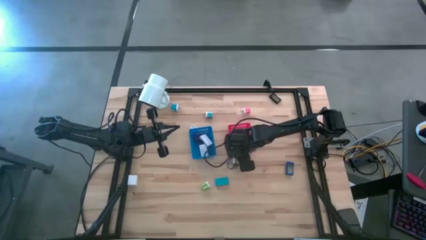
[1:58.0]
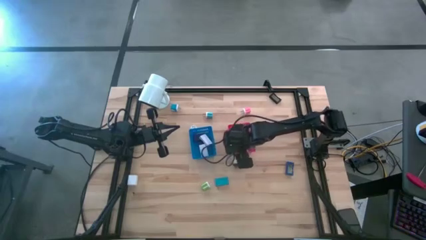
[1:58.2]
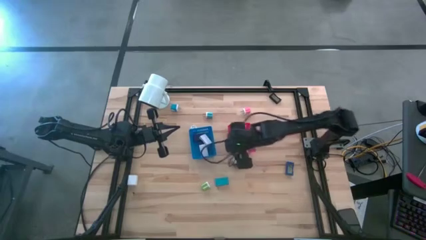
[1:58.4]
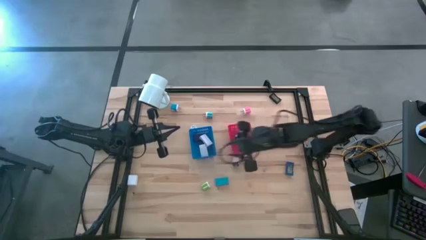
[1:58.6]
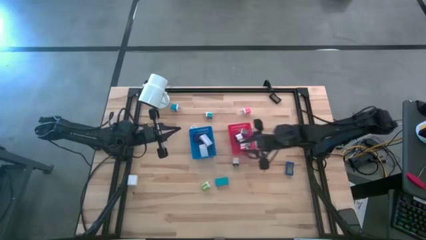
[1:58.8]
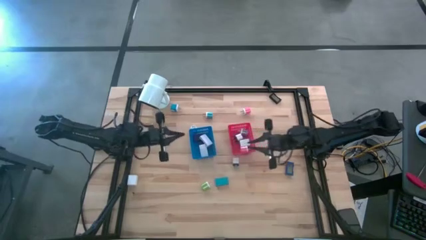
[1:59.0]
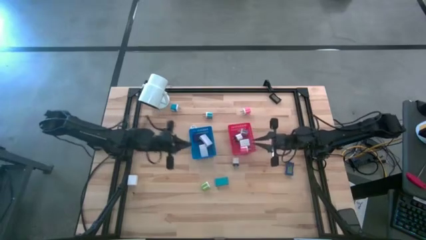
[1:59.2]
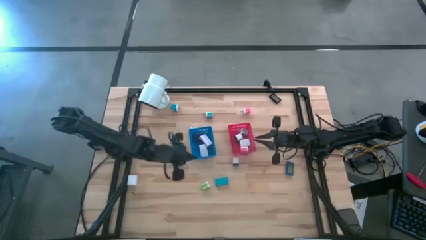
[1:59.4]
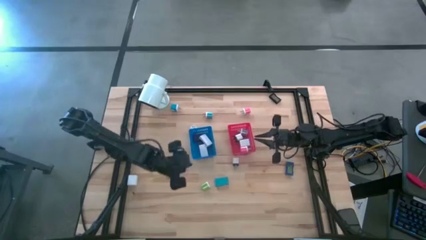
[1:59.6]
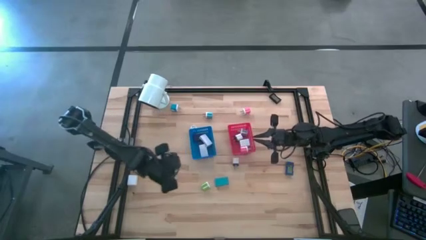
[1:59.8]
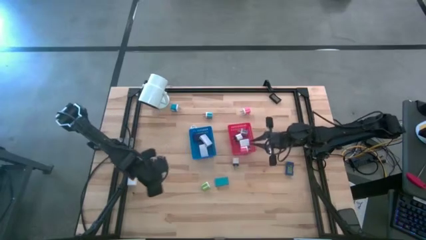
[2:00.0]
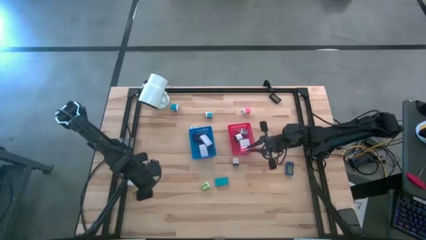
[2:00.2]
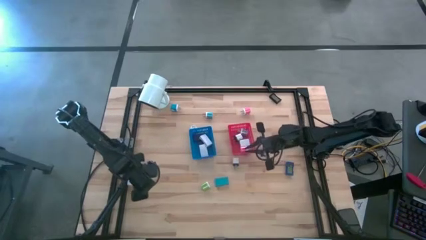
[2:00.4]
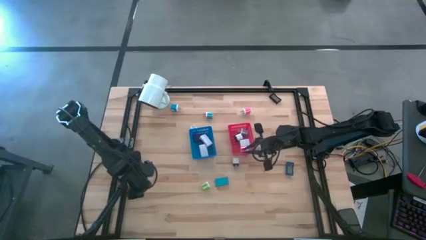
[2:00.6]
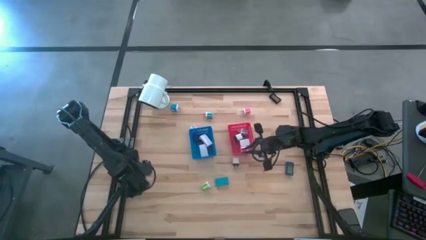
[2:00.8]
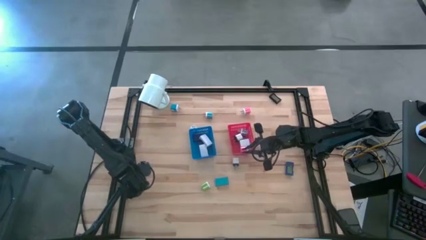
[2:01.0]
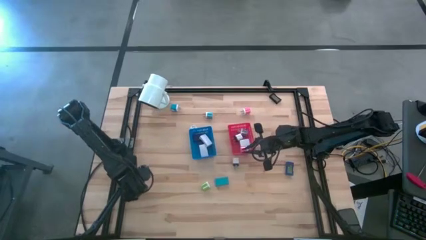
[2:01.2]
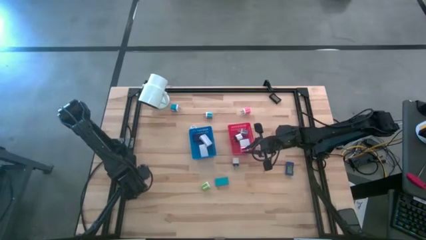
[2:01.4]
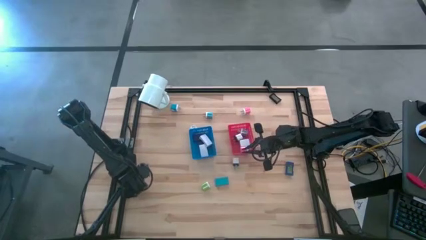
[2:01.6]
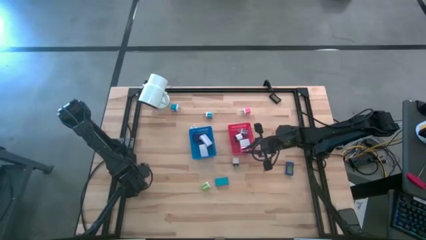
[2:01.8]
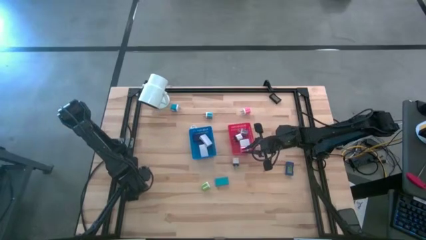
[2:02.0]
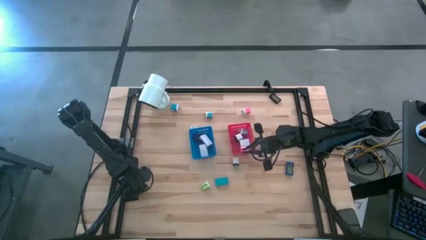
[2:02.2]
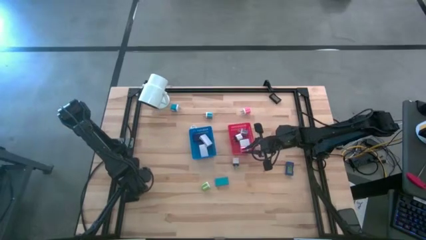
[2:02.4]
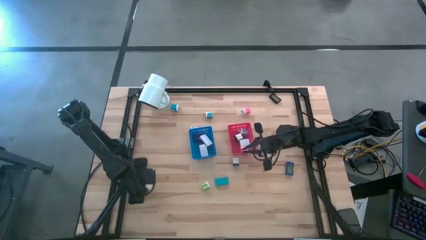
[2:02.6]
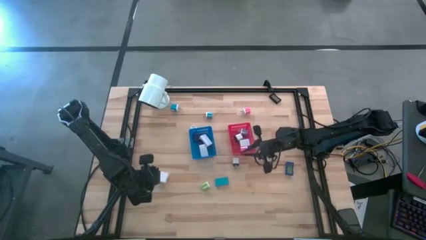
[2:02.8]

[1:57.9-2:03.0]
Task: Pick & Place Office items
Put the white charger adapter into the red bin

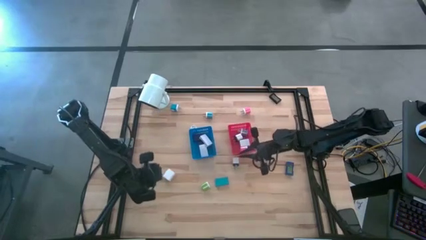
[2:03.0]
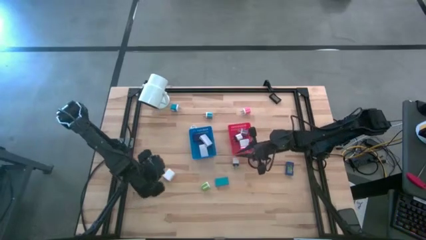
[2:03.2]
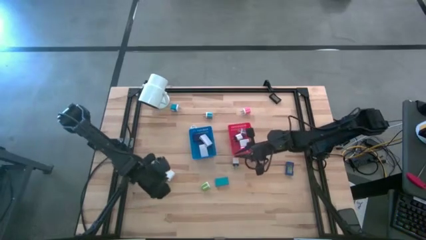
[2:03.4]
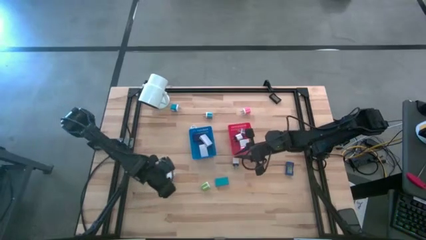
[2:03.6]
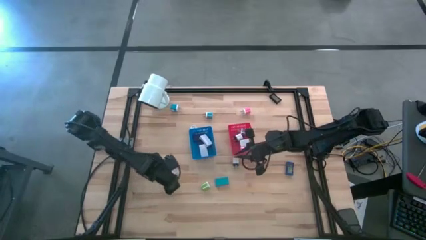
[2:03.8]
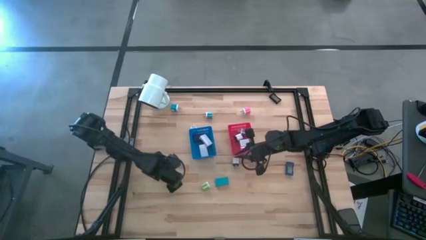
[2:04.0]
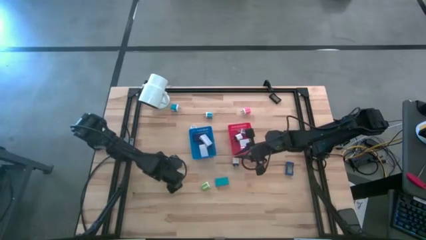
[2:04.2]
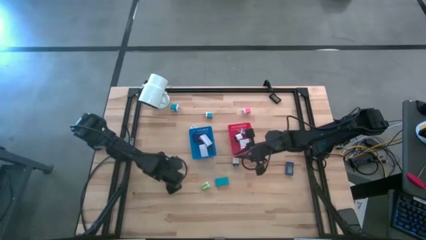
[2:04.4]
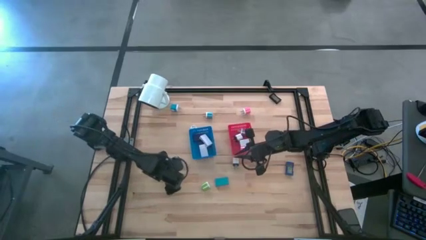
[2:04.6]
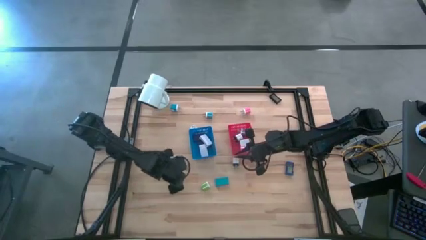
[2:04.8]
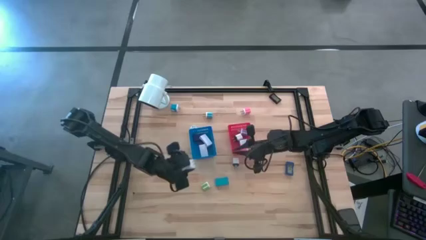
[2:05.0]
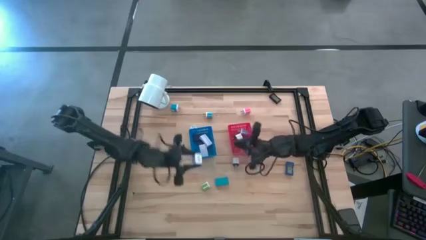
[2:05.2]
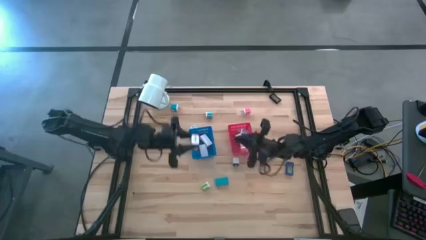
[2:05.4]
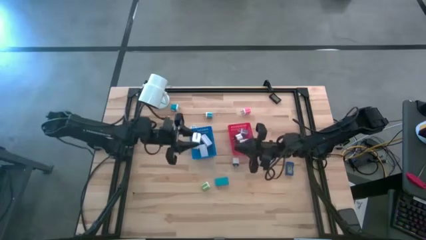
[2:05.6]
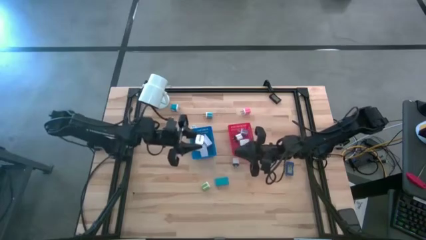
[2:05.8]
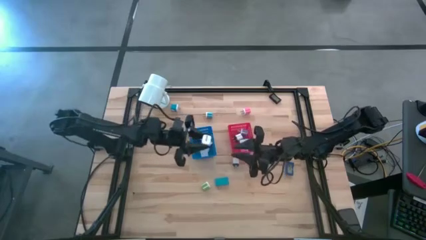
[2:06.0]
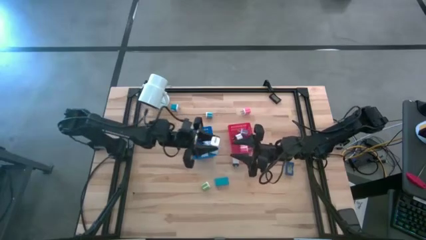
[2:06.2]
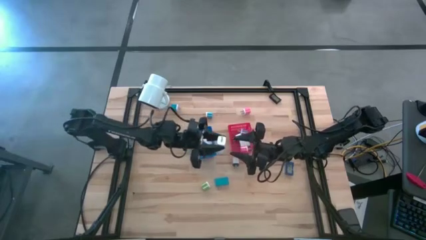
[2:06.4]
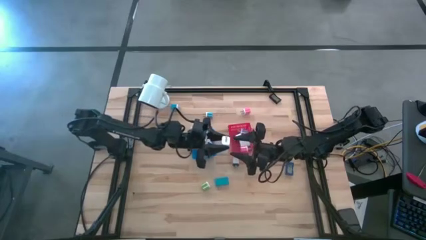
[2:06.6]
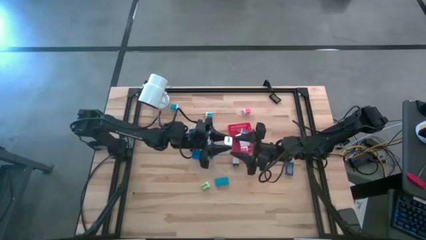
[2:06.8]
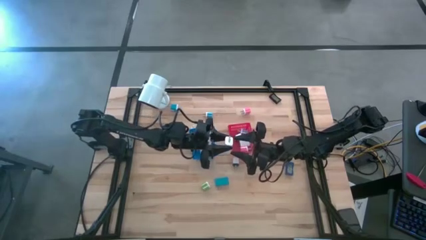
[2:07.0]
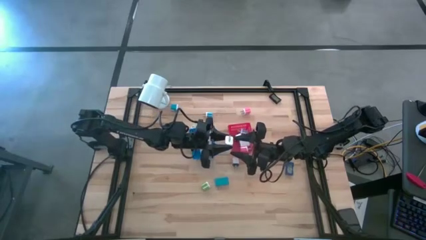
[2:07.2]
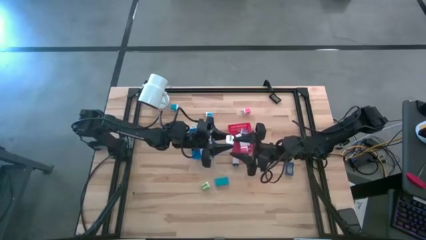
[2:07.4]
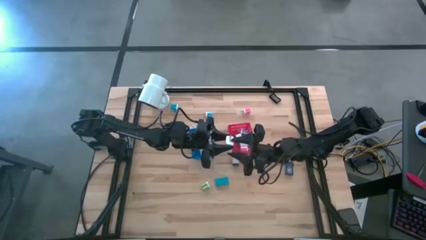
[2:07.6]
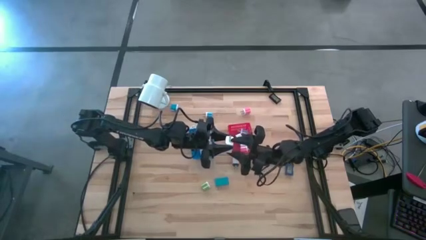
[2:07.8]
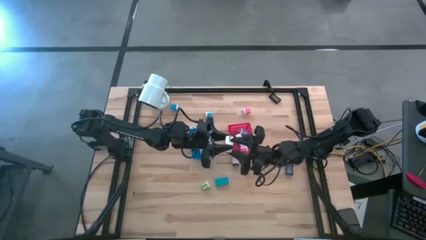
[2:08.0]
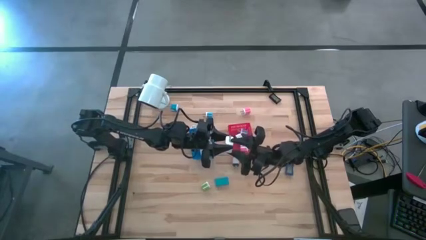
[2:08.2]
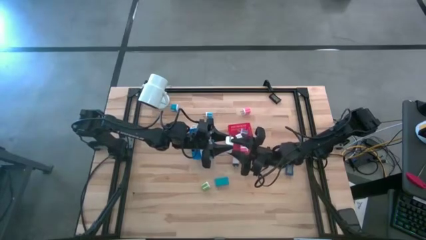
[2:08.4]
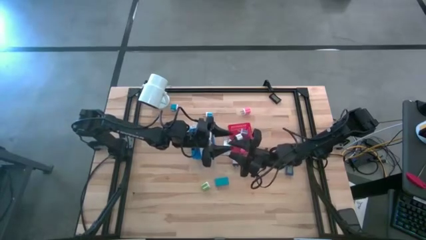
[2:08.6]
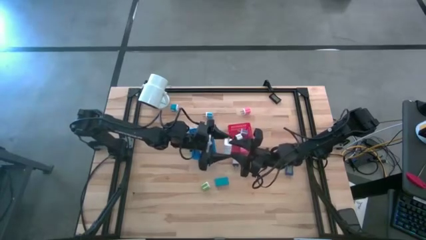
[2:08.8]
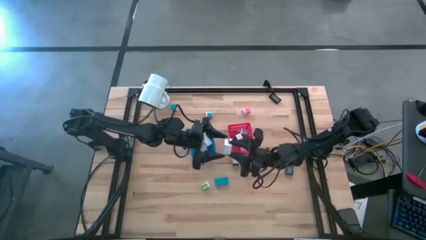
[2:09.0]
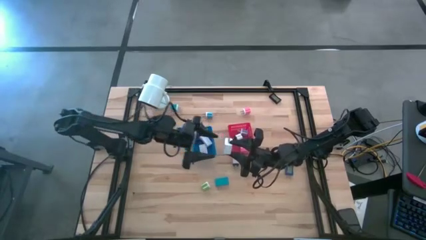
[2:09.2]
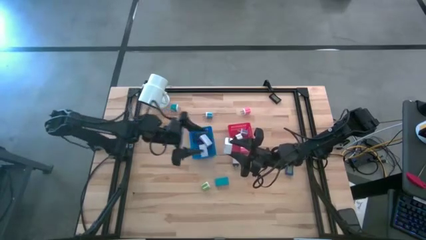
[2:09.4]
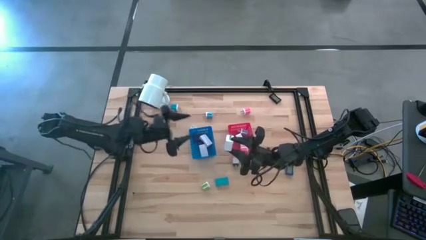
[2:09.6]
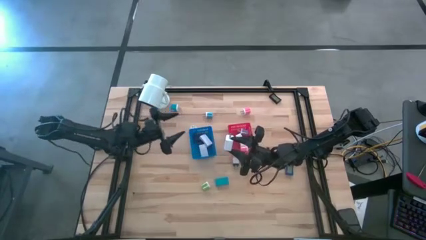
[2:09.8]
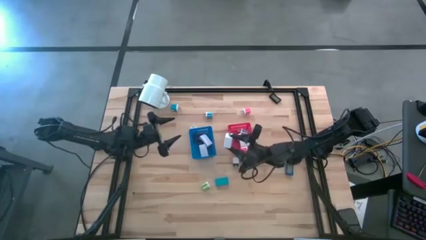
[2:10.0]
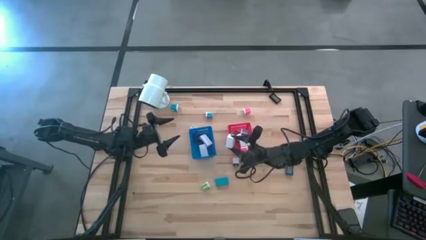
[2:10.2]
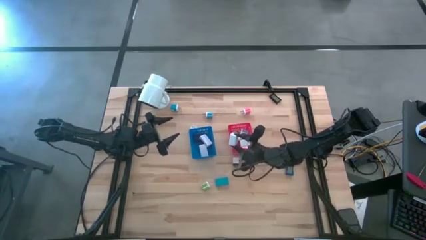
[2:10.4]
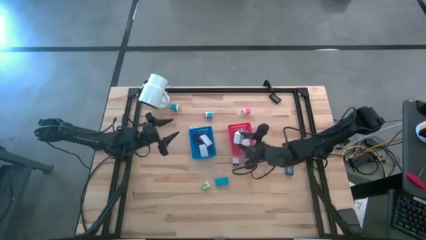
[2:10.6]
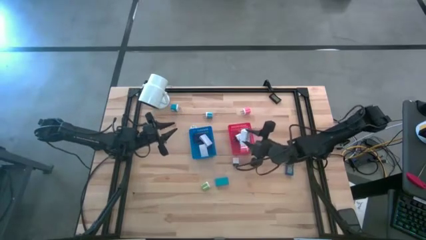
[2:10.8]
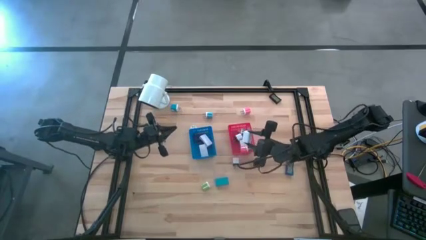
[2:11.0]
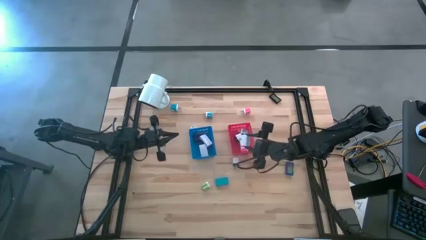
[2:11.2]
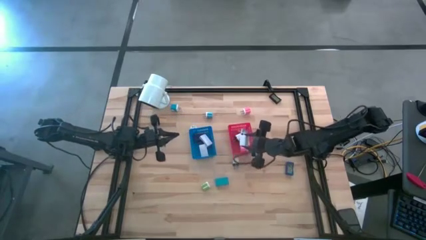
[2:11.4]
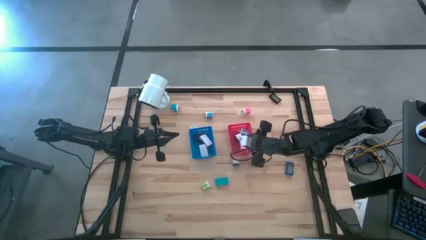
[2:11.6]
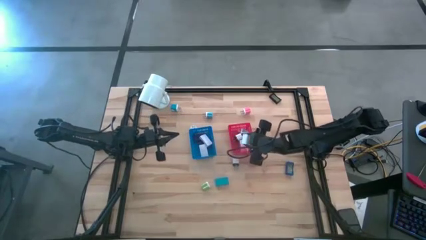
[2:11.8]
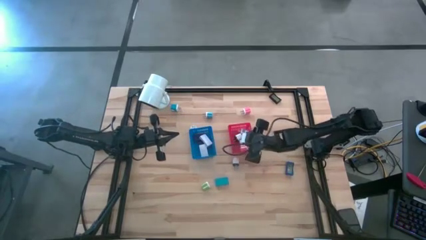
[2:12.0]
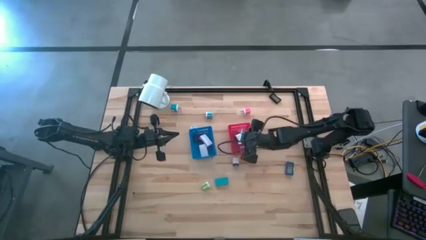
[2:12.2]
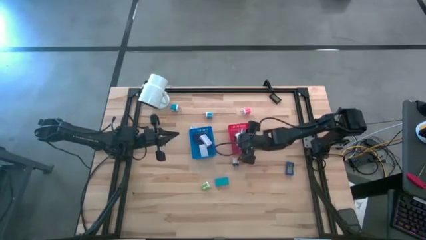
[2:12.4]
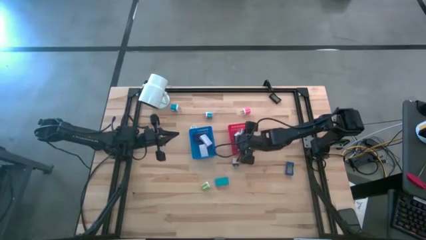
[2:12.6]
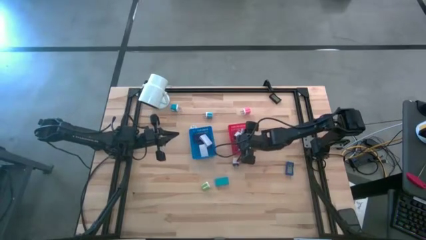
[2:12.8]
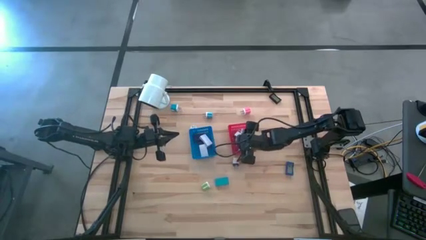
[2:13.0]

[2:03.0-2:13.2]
Put the white charger adapter into the red bin
